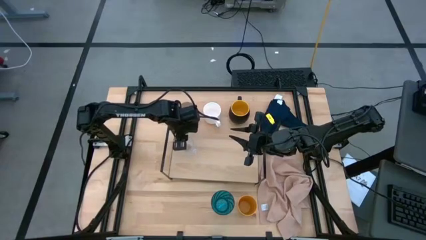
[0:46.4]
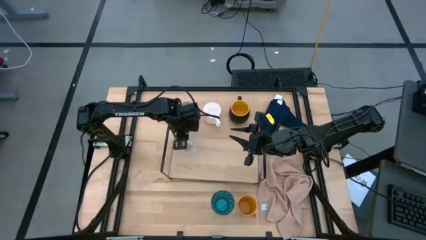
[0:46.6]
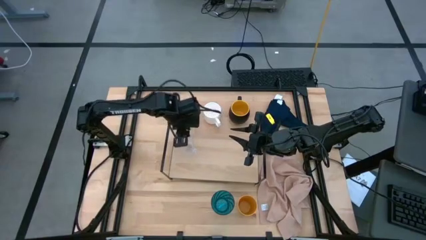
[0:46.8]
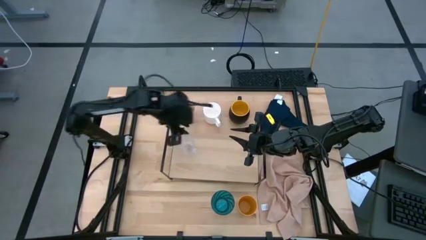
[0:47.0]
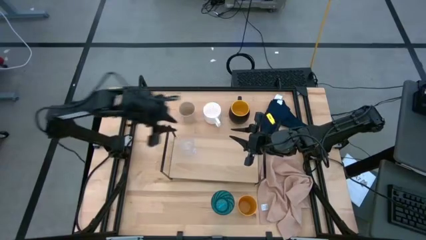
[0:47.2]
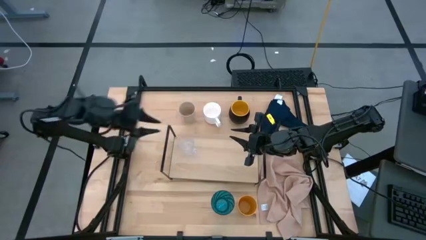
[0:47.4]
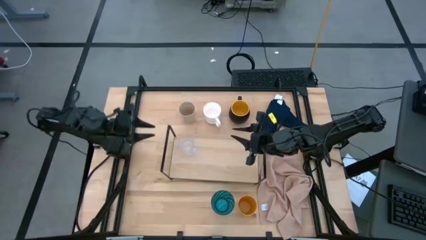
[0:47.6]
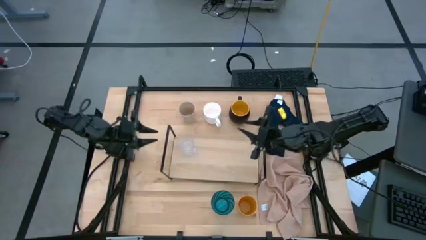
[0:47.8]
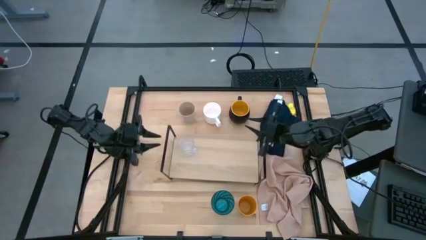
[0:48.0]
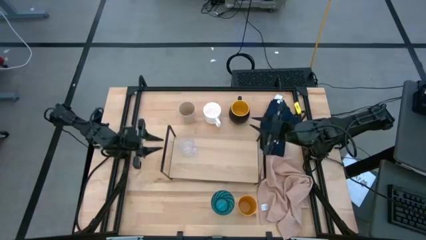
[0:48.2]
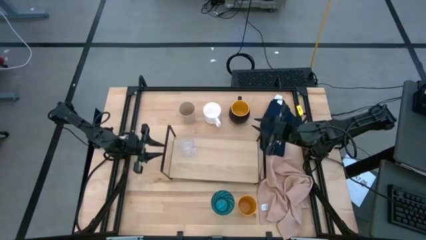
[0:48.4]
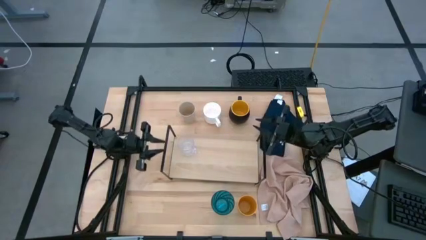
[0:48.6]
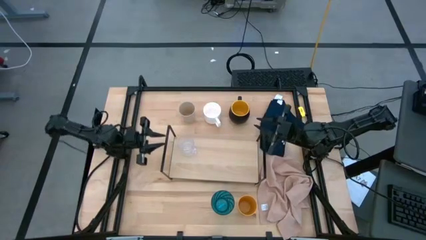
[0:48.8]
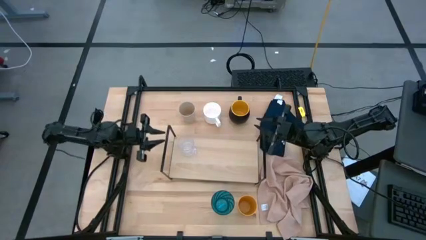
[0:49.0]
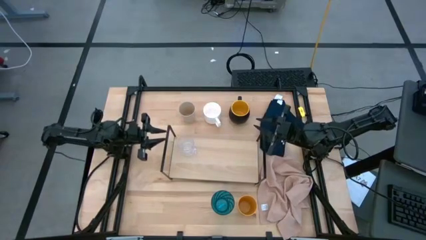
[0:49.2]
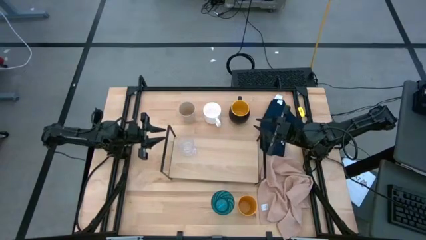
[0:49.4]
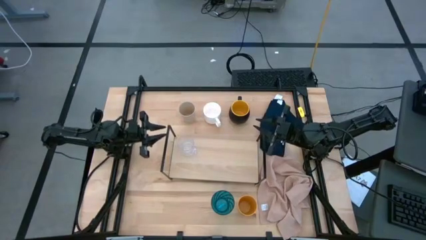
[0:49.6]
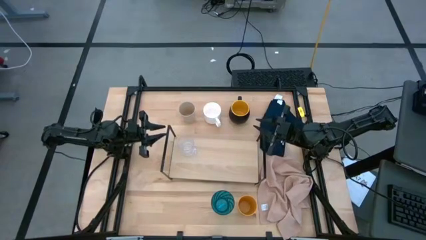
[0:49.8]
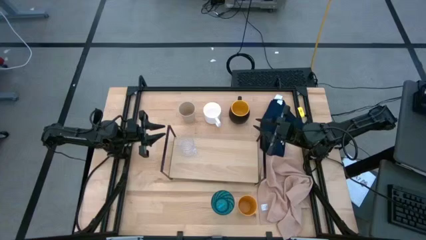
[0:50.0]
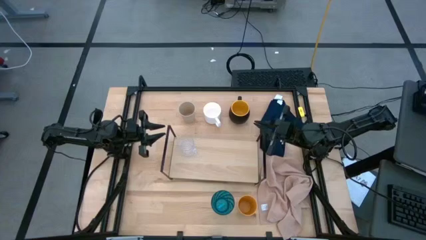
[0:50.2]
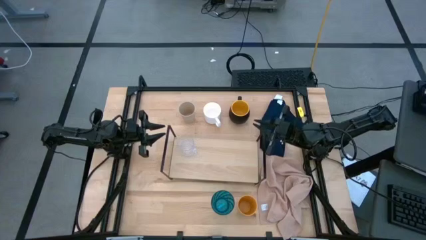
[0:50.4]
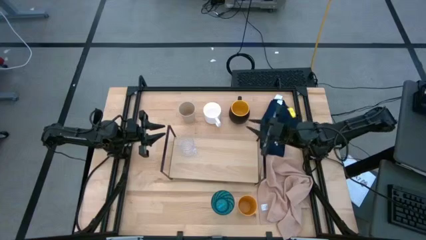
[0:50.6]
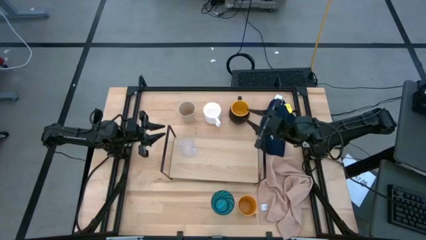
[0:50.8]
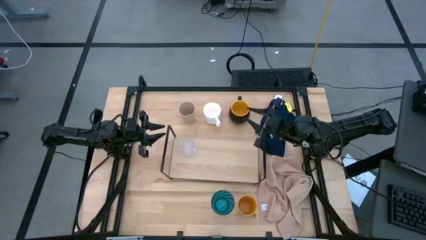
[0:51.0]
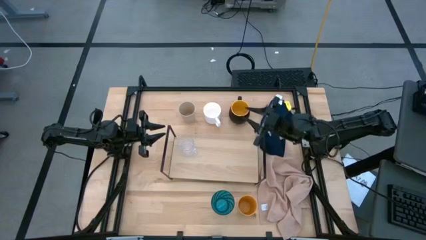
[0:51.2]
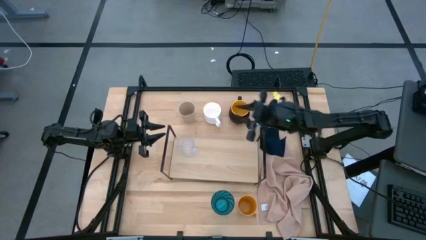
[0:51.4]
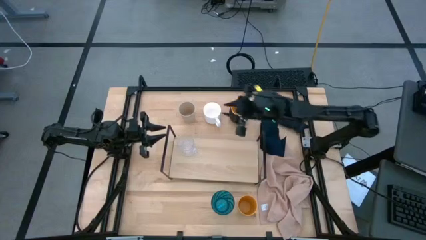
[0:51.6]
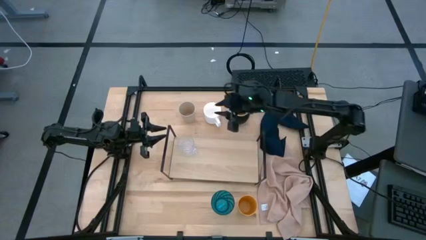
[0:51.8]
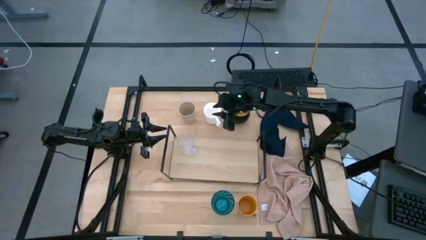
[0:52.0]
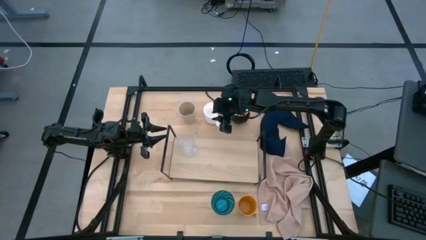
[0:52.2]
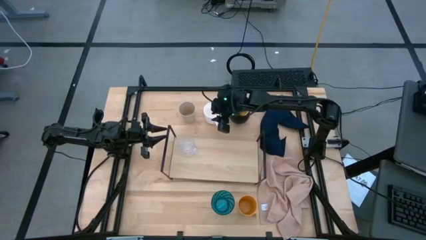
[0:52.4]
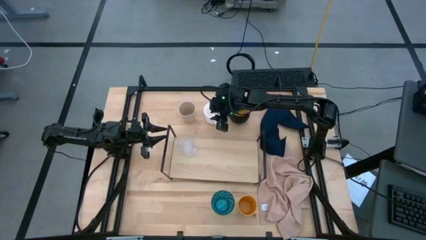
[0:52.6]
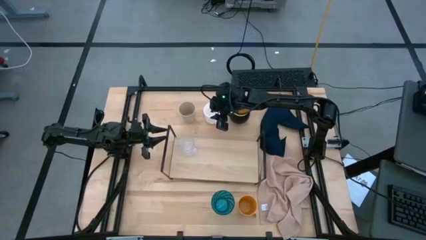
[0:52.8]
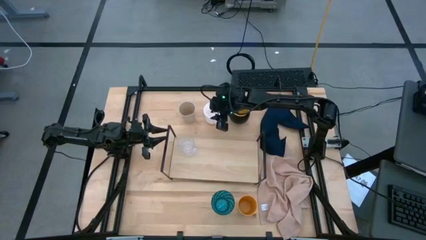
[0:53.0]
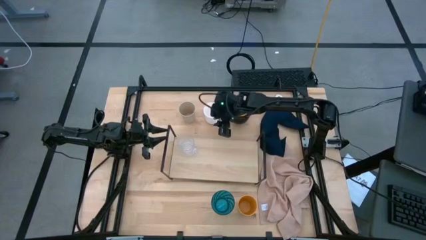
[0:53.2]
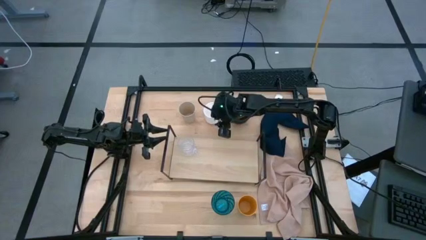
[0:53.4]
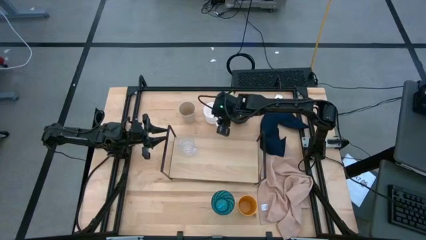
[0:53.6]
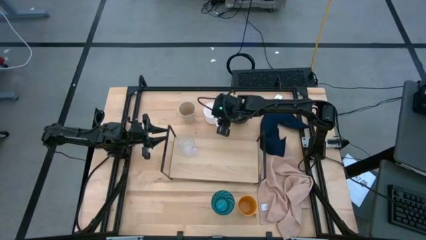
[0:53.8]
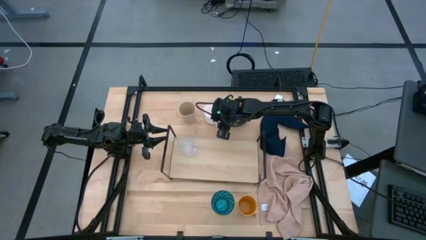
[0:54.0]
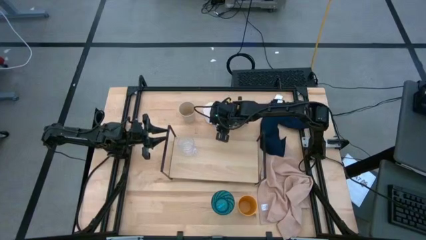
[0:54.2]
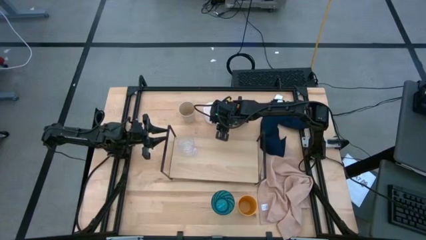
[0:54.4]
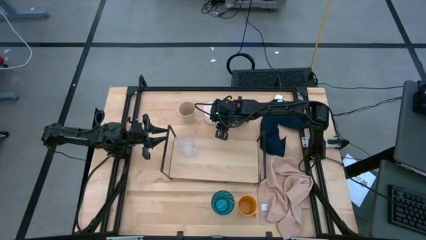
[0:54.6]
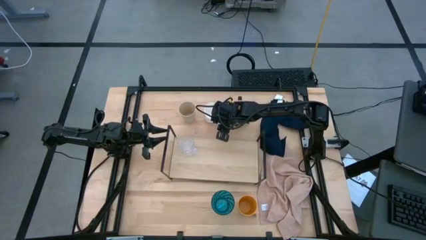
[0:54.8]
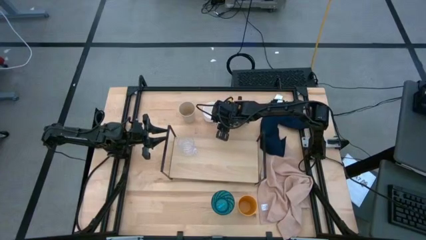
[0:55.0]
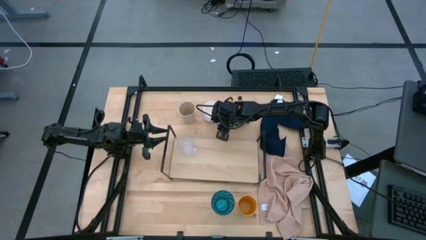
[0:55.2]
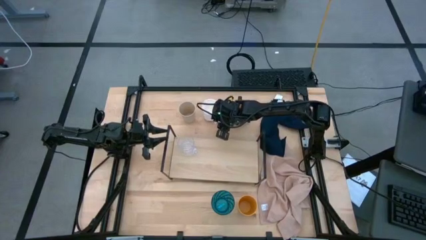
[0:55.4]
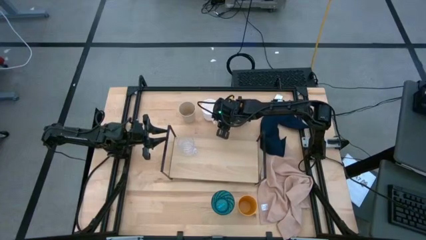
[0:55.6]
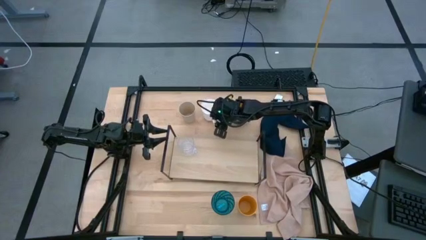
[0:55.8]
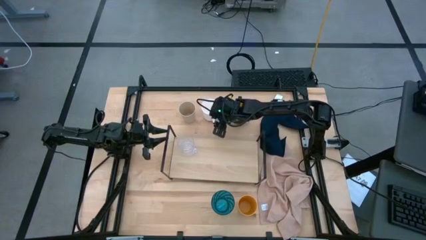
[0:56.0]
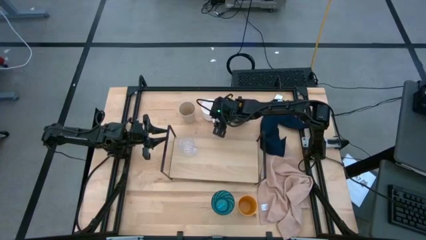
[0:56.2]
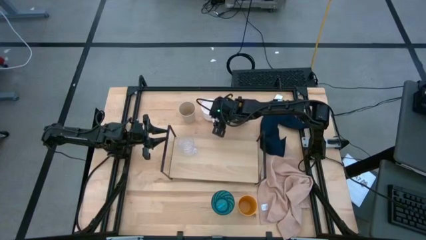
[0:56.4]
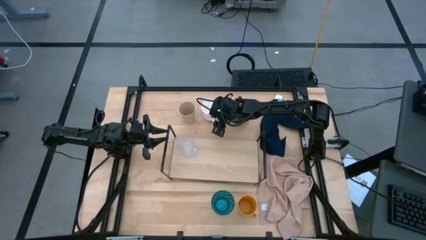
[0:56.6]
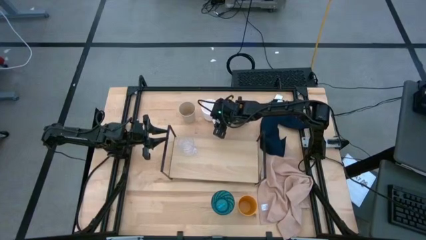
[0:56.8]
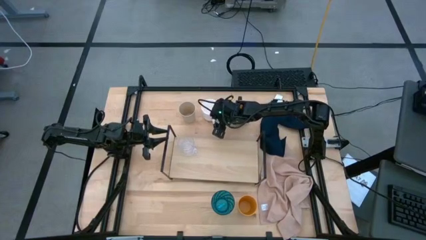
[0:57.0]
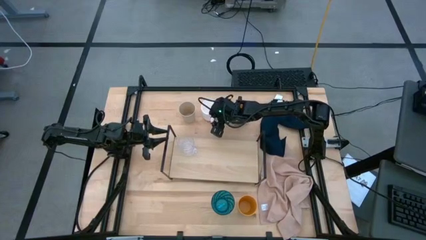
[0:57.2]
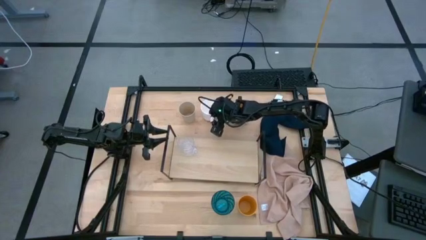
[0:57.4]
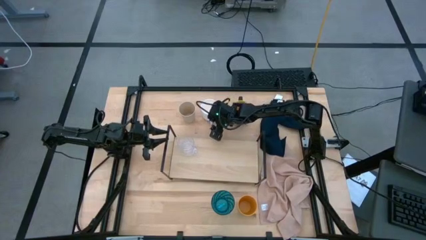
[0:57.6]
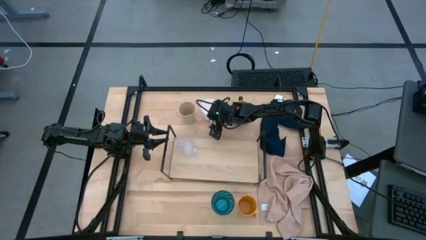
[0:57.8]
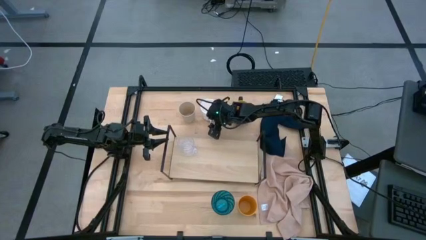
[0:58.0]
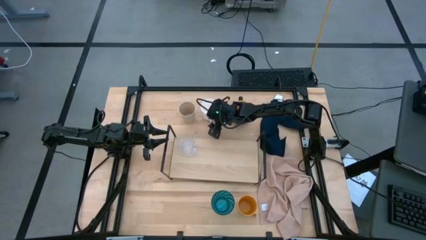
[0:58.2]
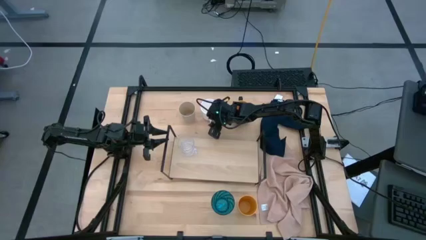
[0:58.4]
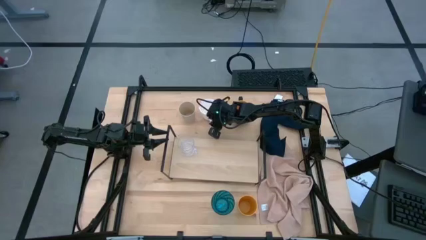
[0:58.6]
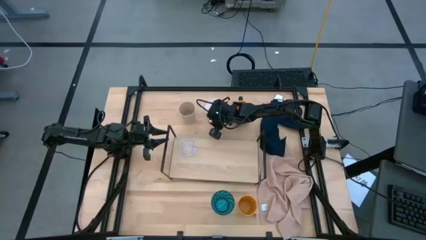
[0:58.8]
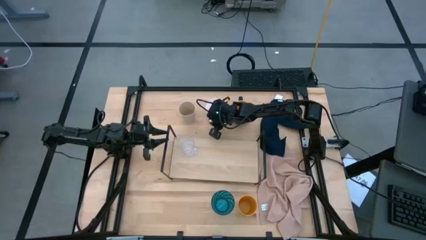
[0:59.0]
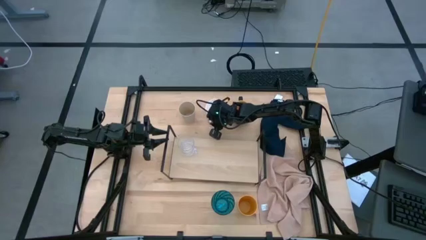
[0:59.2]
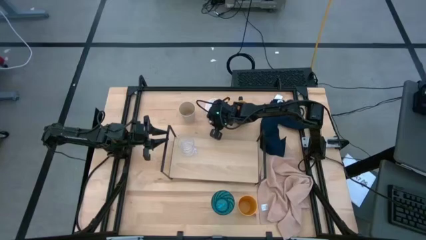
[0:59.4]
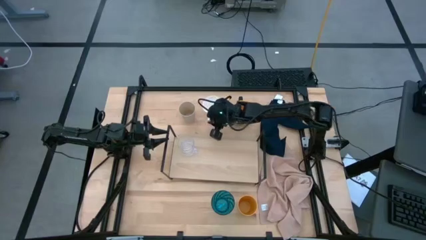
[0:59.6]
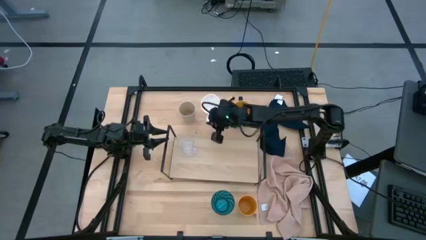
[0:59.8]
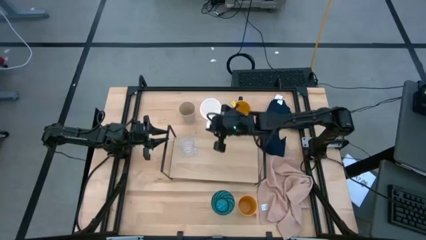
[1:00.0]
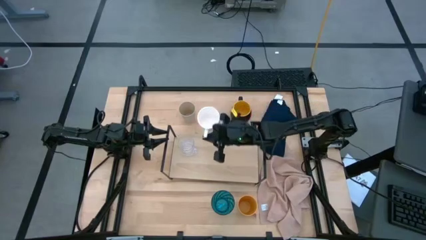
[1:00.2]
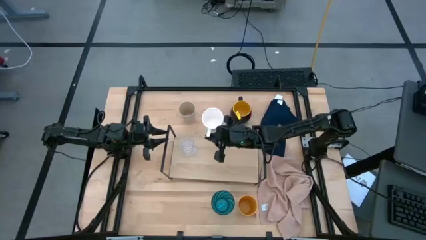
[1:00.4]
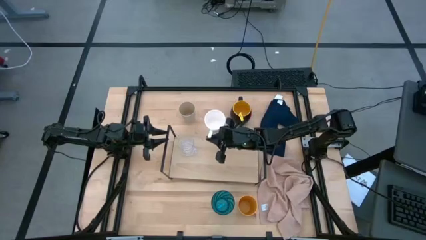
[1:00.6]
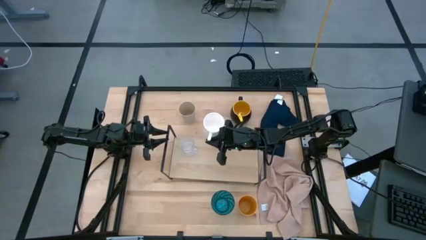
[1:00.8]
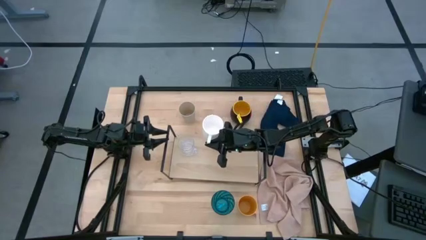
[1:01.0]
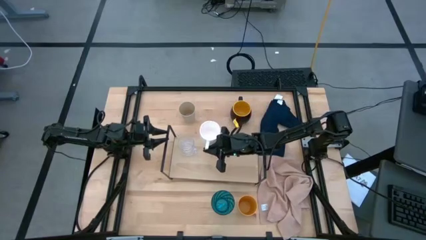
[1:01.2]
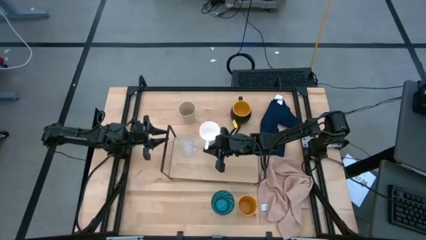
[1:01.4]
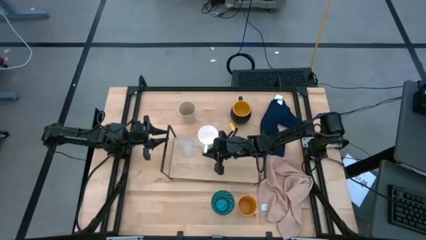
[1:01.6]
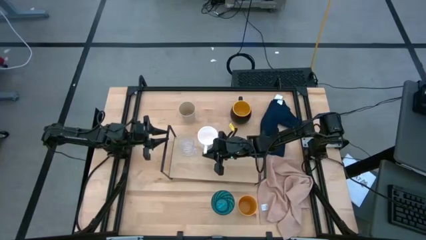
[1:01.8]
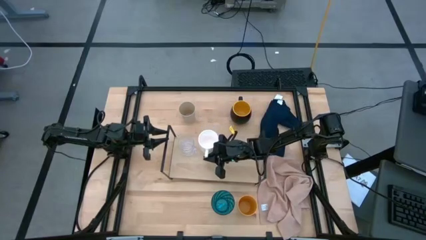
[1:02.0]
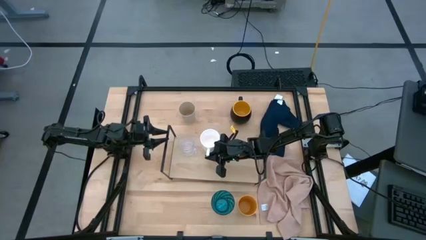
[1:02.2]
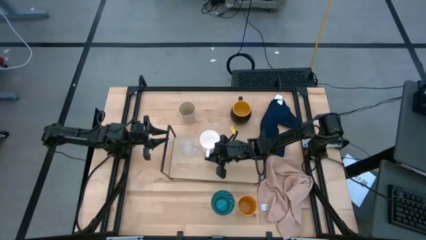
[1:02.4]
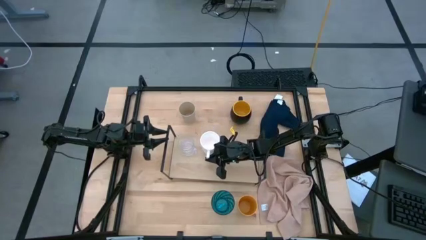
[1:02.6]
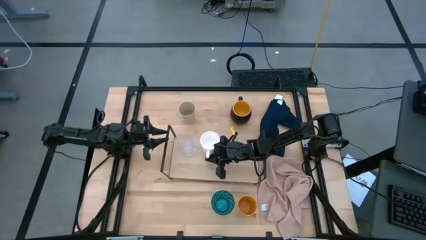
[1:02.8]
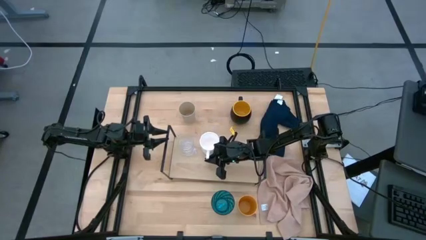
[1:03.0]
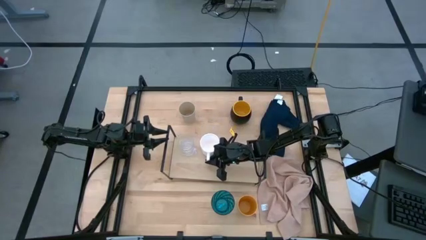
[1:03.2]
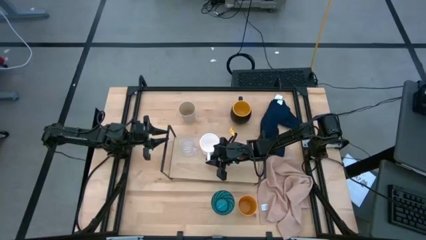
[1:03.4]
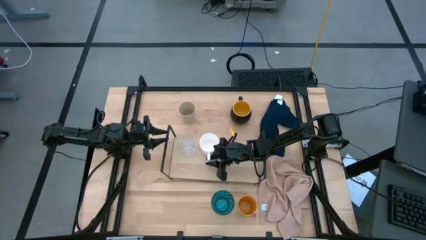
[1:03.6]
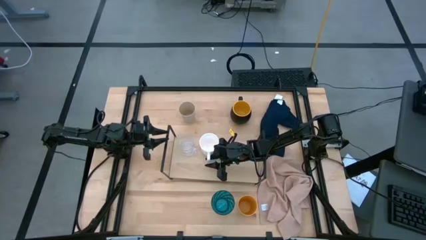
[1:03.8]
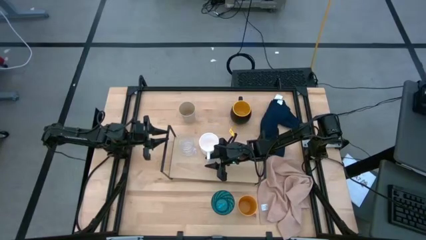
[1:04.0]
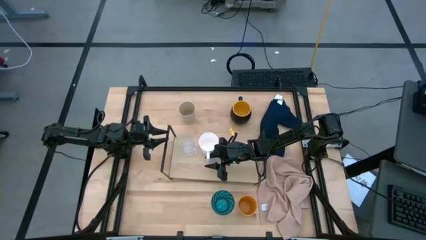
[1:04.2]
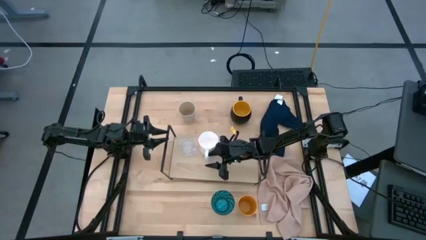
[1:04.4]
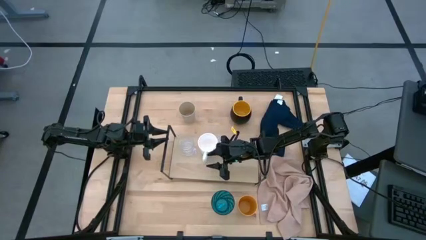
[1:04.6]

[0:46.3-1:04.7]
Task: Stack small to large cups/mugs on shelf
Put the white mug on the shelf
